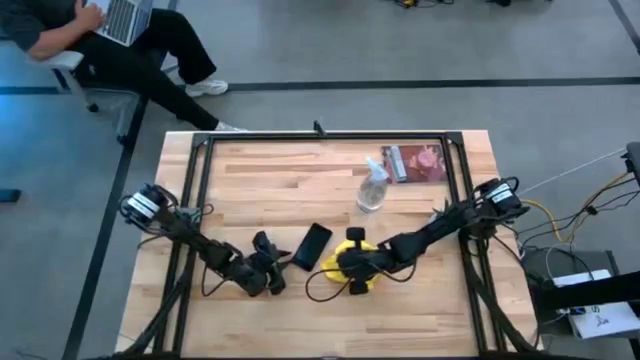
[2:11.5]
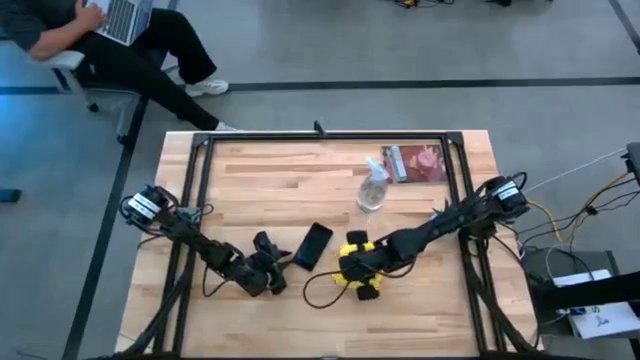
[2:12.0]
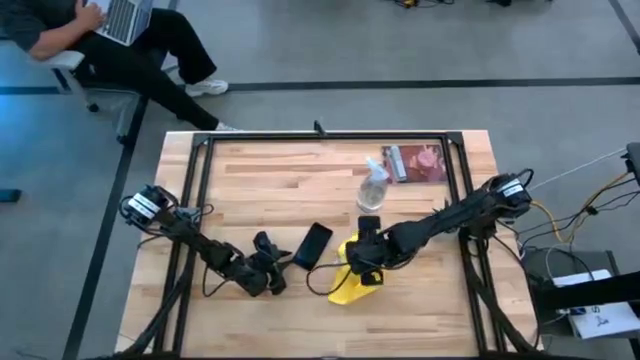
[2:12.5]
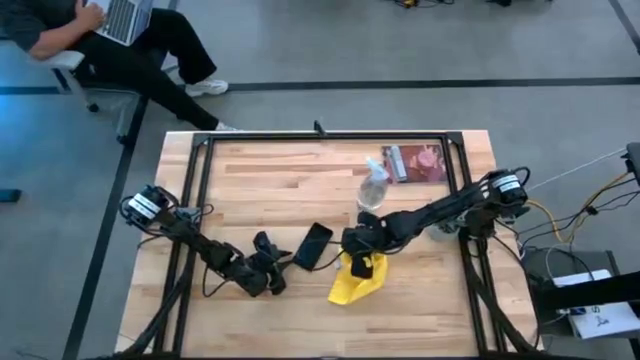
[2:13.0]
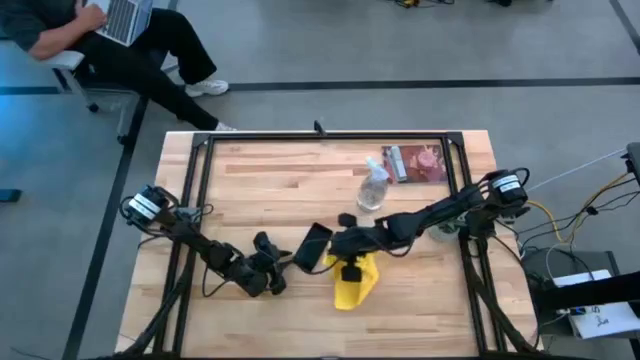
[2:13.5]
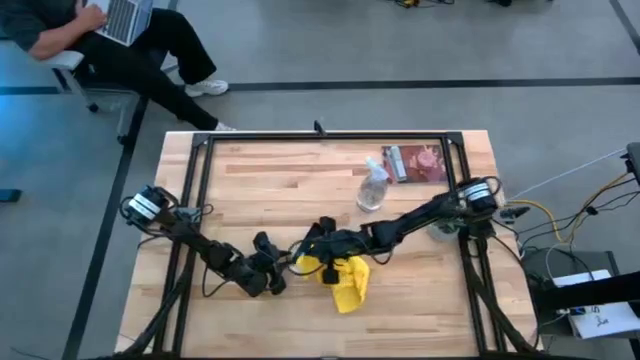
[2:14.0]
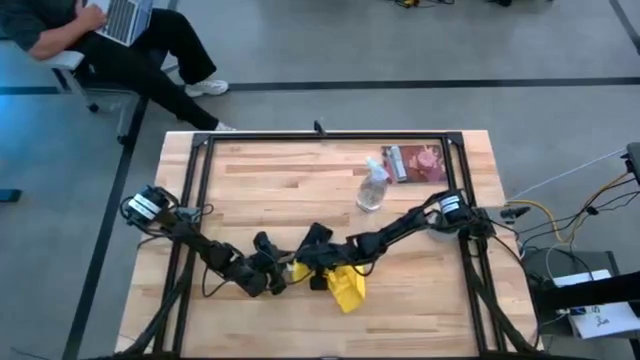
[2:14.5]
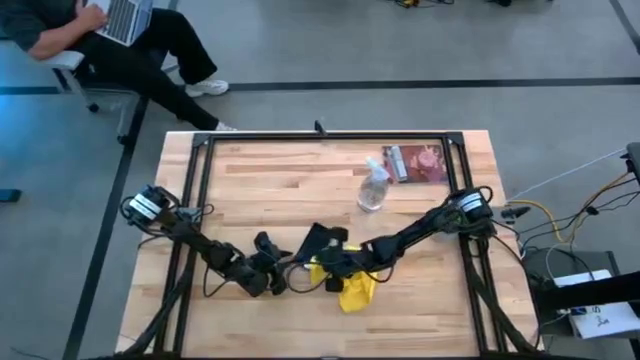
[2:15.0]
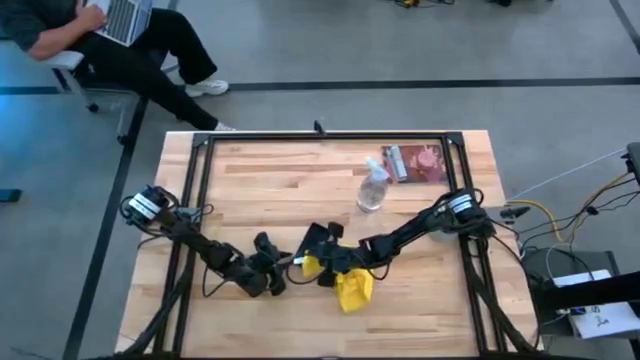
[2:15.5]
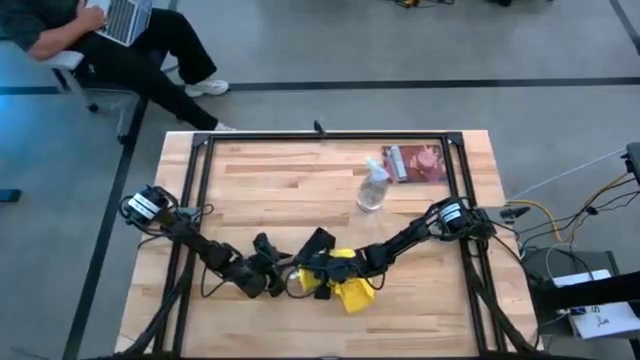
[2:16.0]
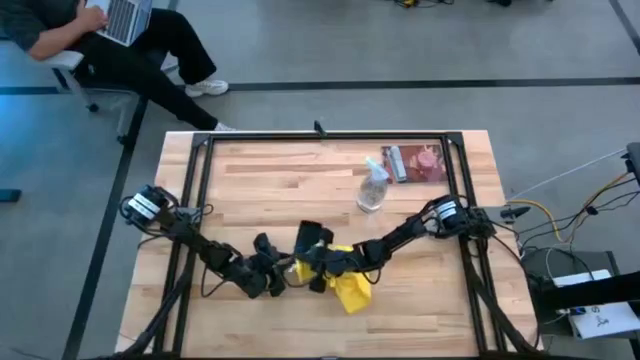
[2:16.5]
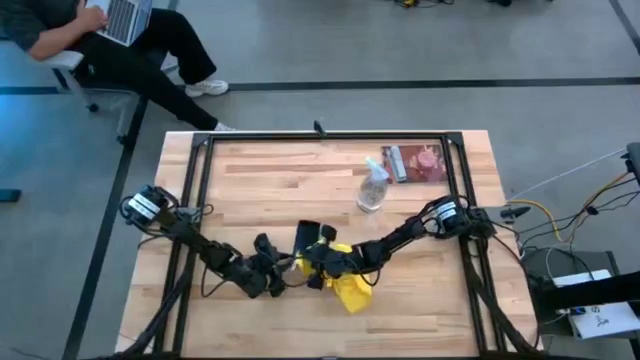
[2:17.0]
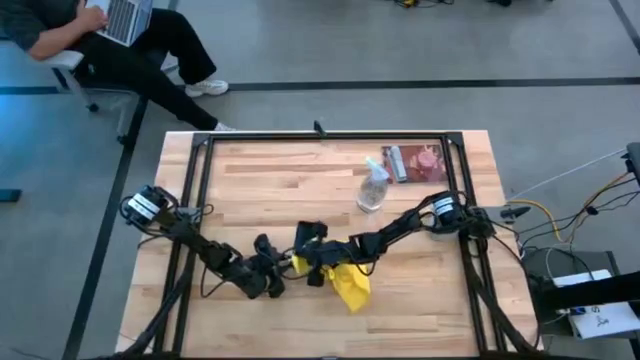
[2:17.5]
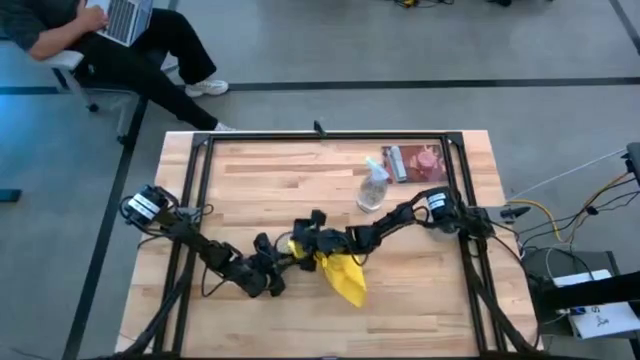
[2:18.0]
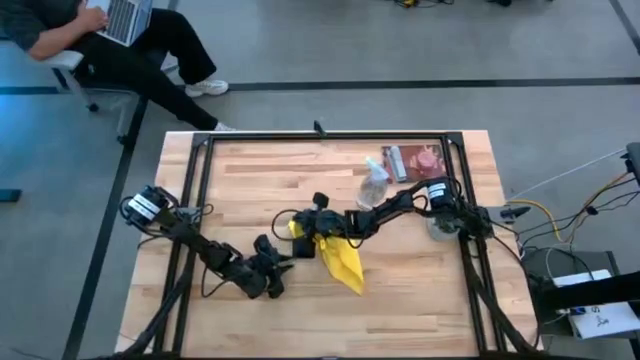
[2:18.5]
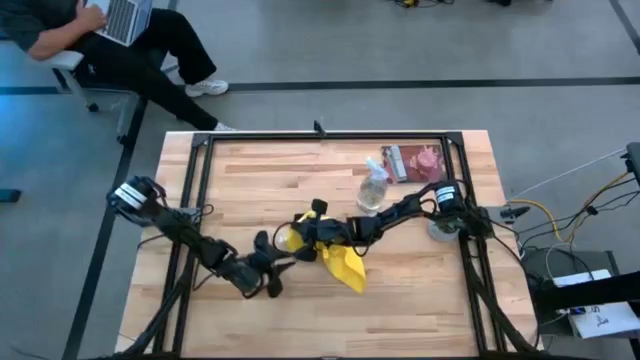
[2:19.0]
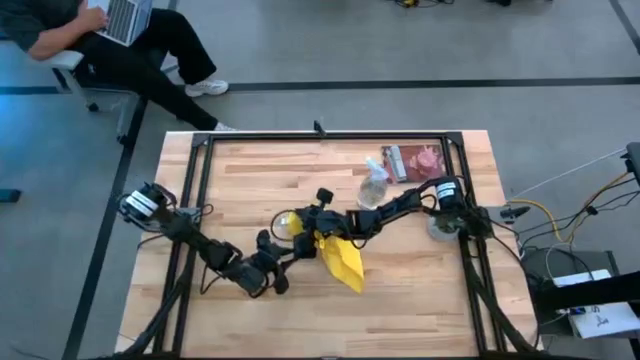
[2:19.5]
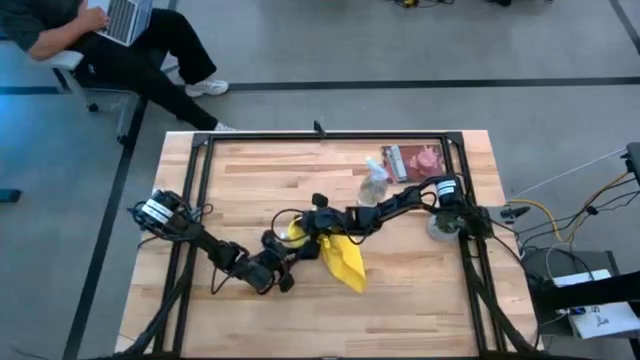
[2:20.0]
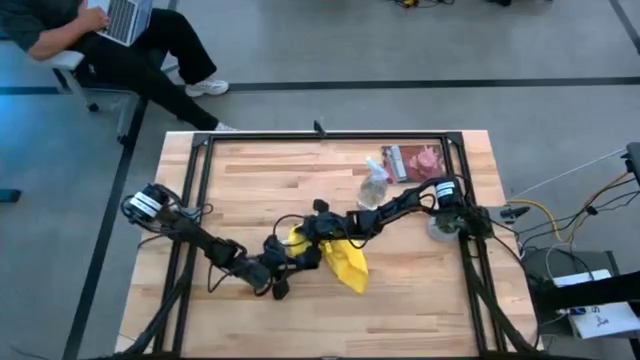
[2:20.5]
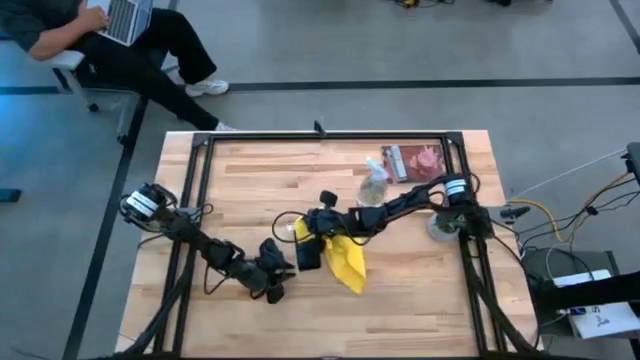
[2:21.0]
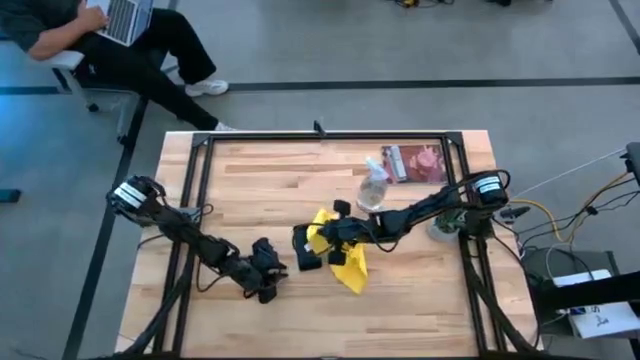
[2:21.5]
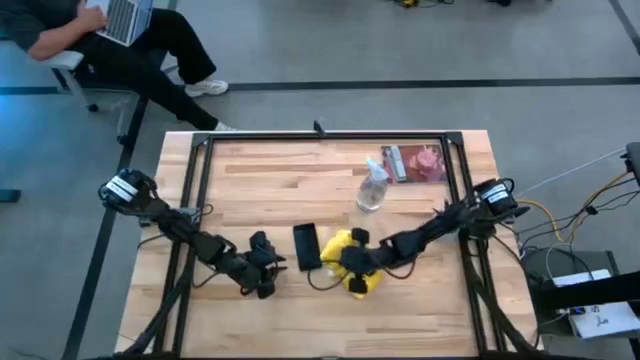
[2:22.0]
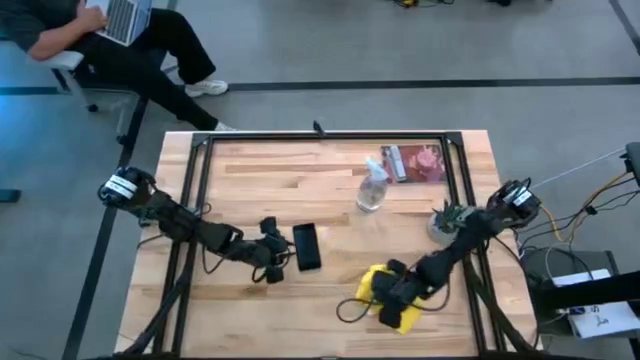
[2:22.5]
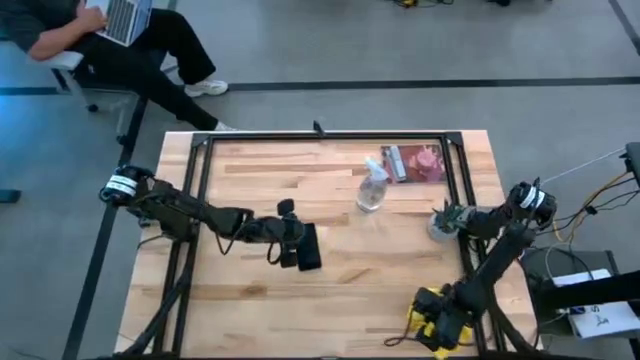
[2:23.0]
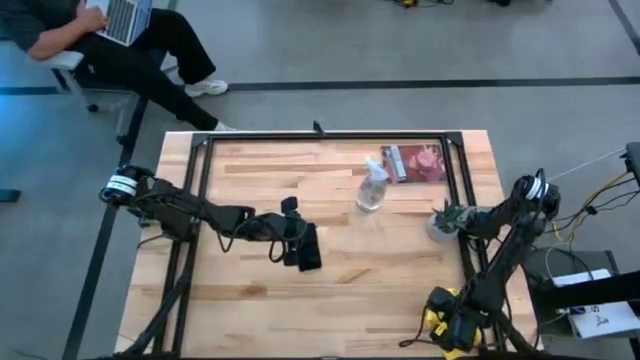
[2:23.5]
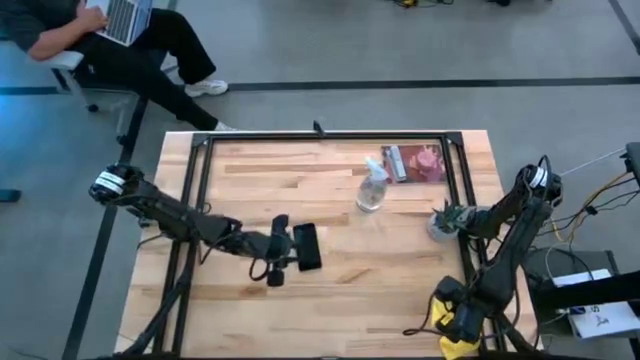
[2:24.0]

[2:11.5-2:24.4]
Task: Apply microfiber cloth
Wipe the black cellphone with the yellow microfiber cloth

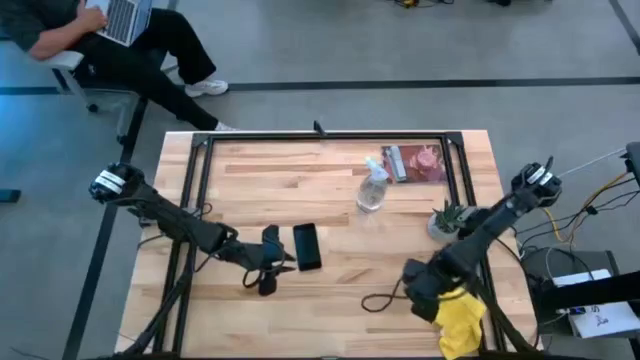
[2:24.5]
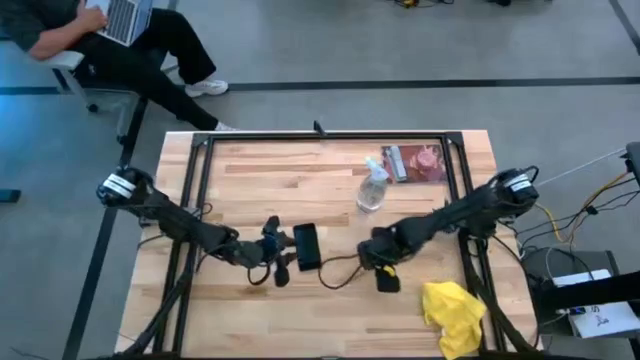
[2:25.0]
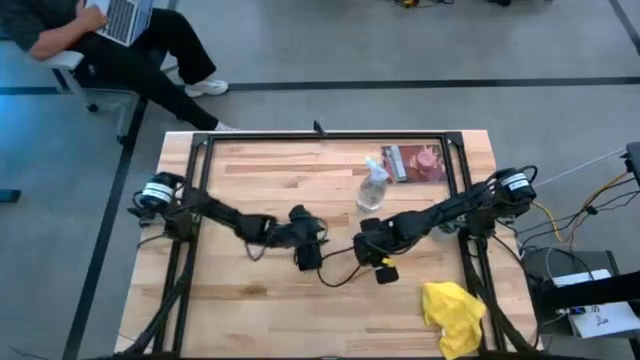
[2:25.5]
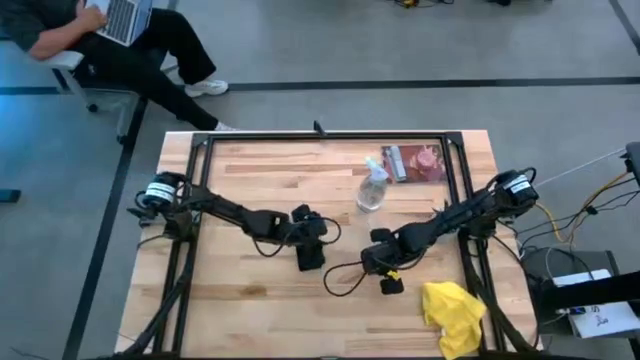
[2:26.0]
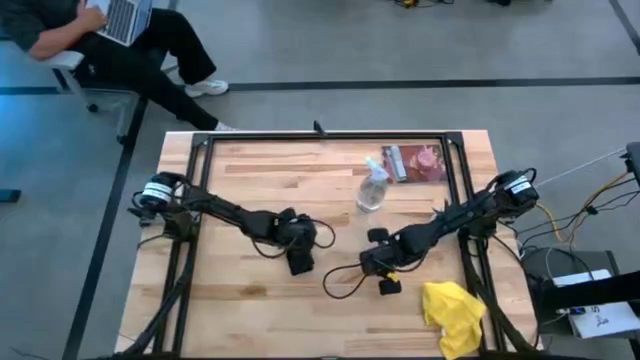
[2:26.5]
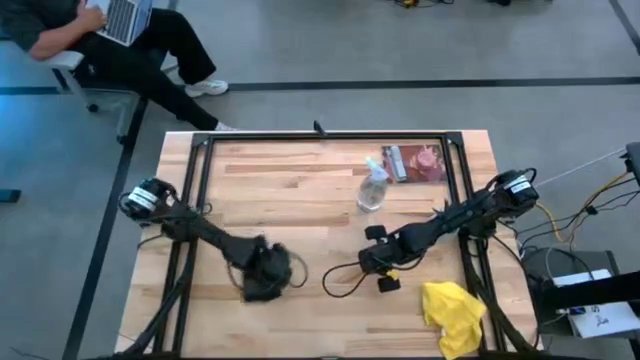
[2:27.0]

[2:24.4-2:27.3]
Move the black cellphone to the bottom right of the table

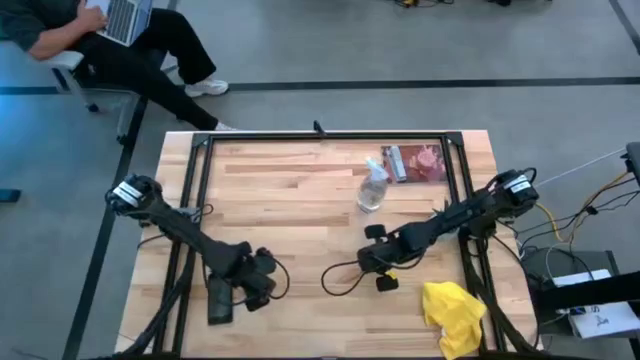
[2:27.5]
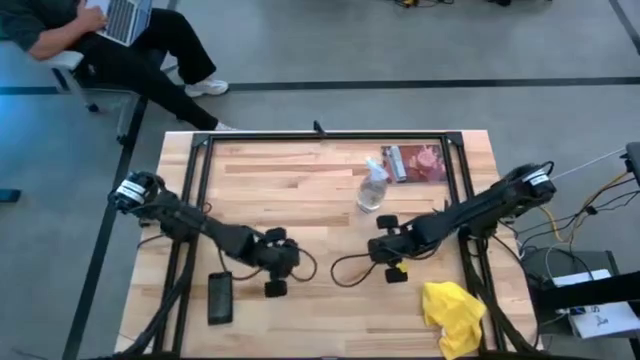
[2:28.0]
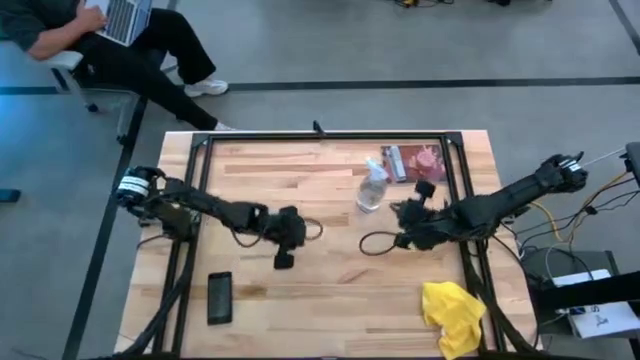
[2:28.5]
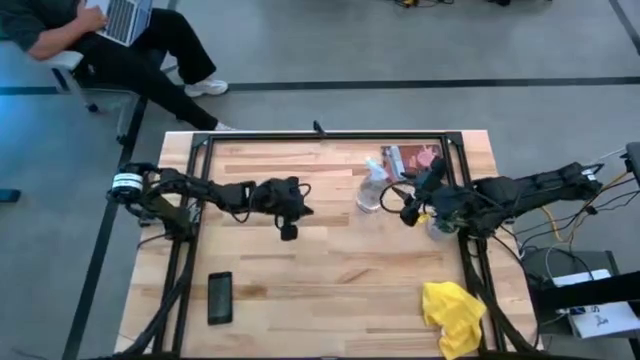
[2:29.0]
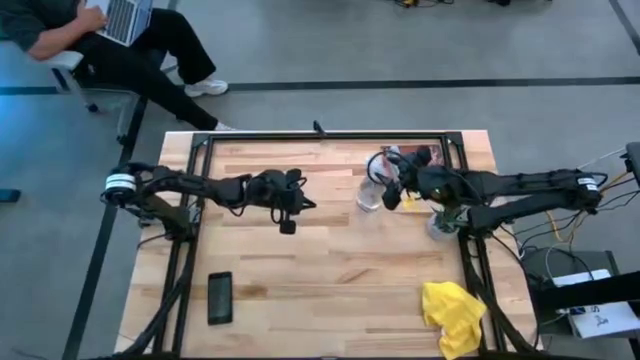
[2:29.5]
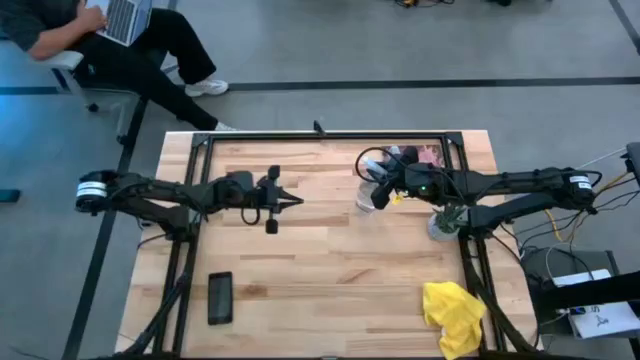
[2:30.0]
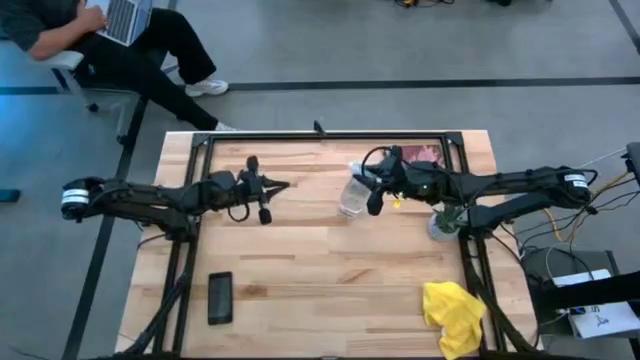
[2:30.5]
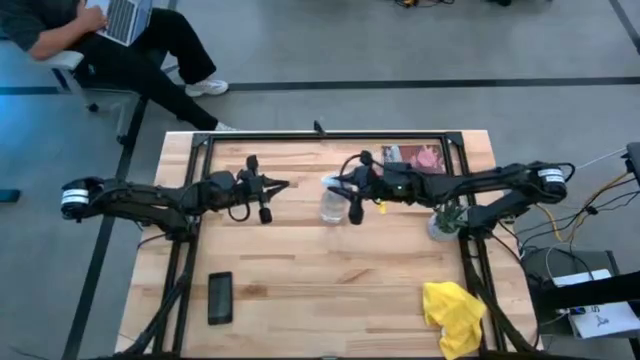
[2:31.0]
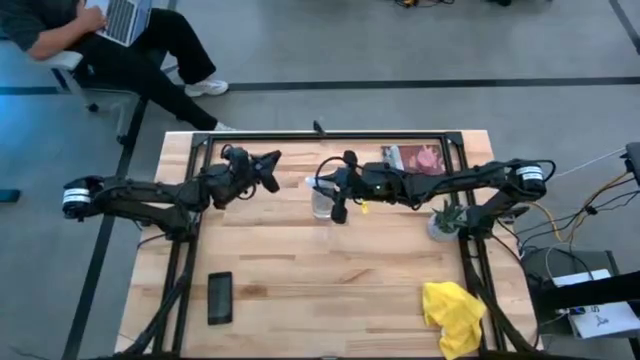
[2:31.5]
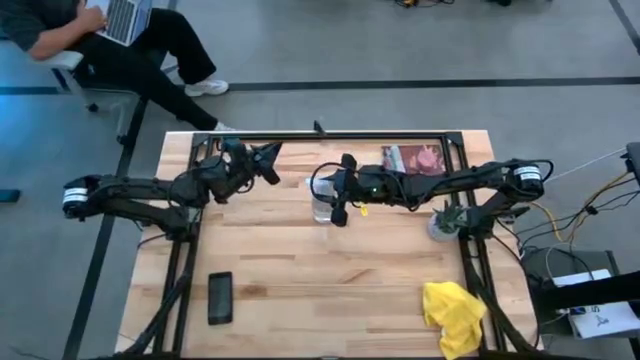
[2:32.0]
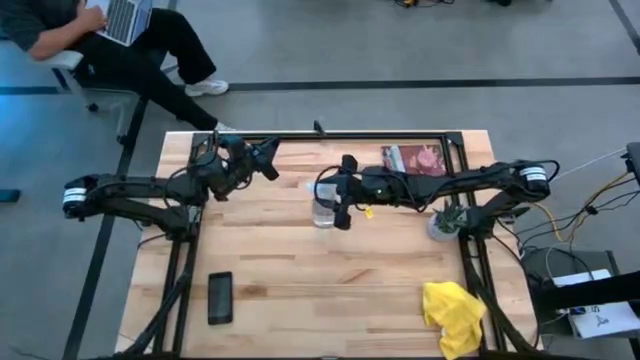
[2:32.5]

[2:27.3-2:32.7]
Move the spray bottle to the center of the table
